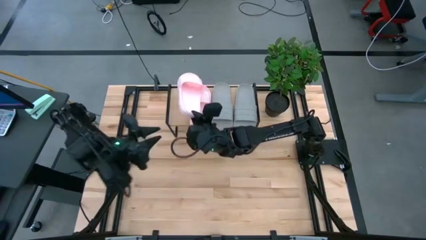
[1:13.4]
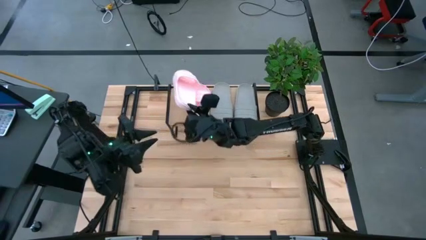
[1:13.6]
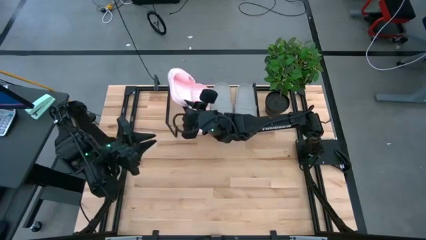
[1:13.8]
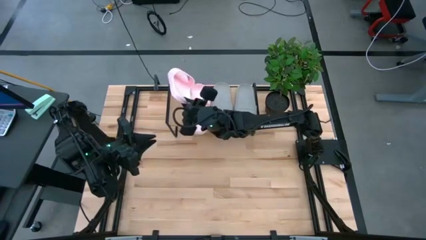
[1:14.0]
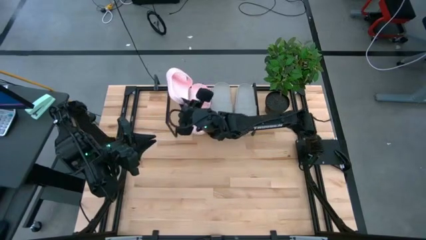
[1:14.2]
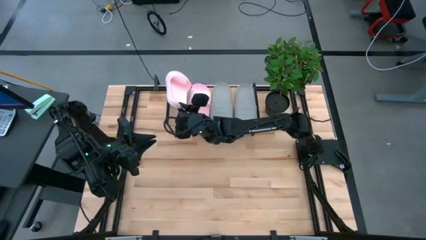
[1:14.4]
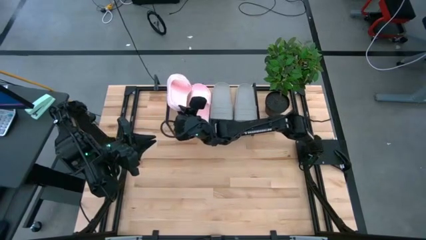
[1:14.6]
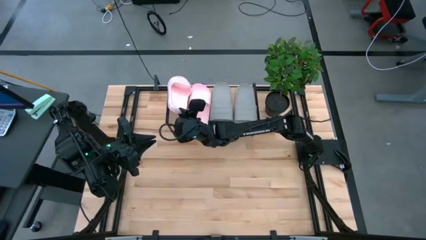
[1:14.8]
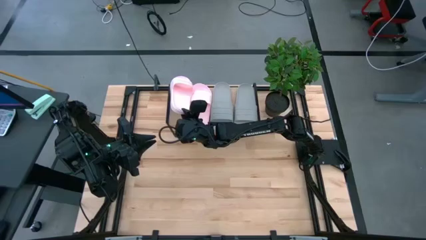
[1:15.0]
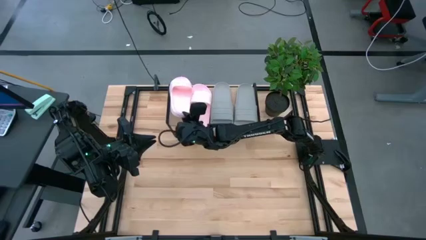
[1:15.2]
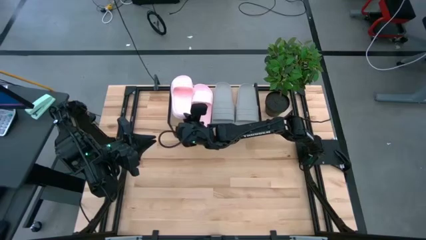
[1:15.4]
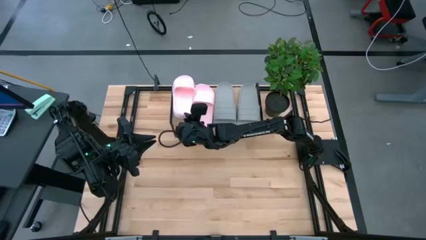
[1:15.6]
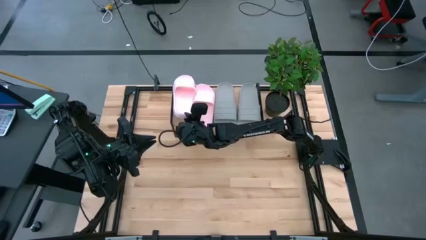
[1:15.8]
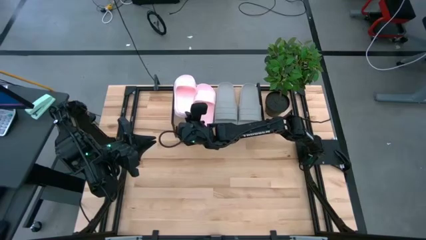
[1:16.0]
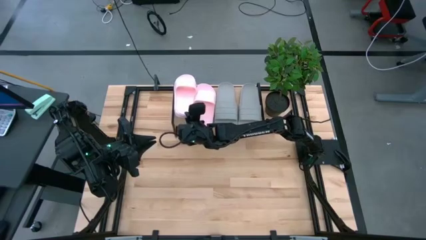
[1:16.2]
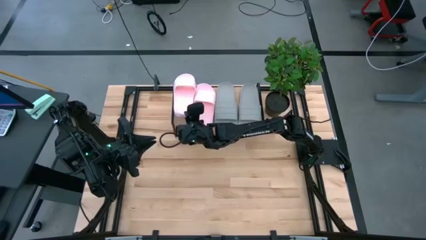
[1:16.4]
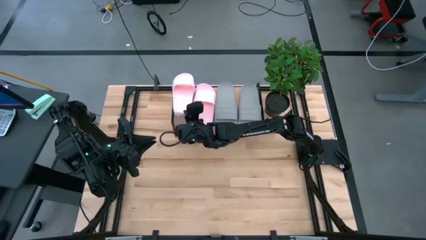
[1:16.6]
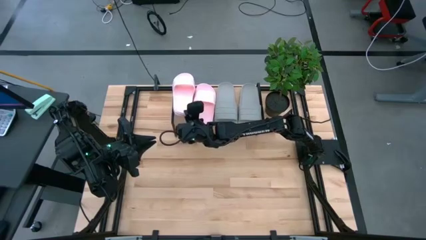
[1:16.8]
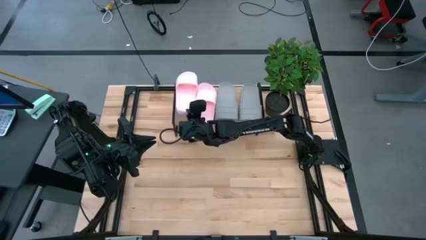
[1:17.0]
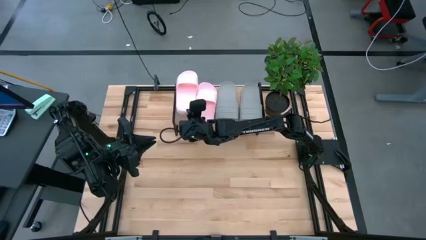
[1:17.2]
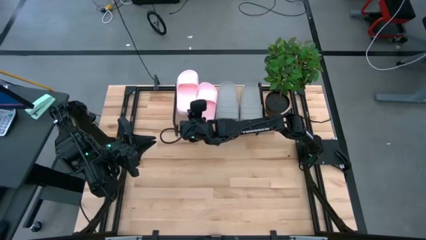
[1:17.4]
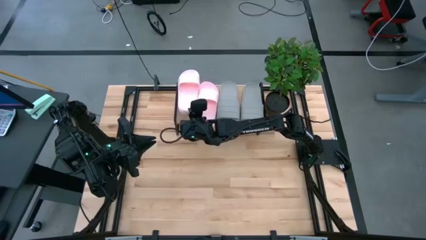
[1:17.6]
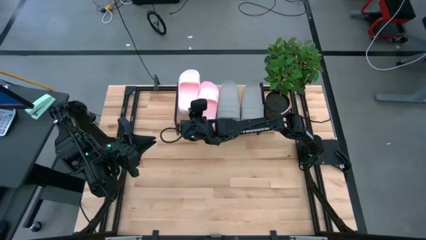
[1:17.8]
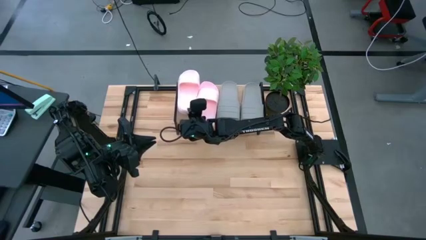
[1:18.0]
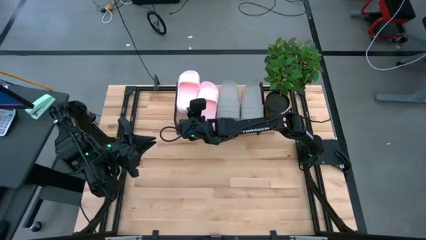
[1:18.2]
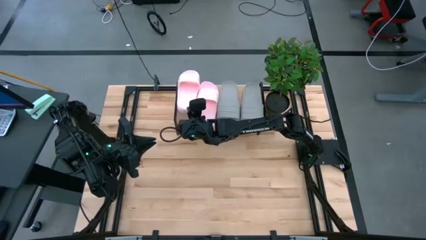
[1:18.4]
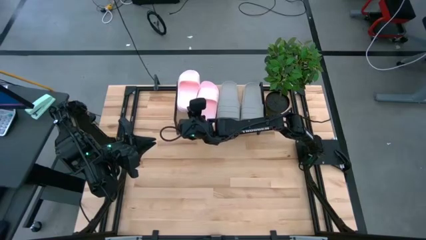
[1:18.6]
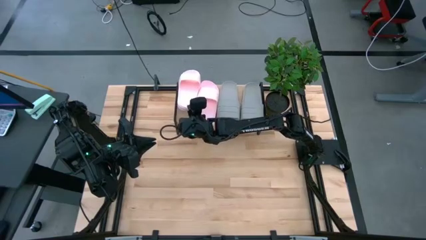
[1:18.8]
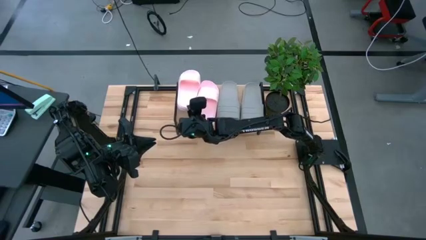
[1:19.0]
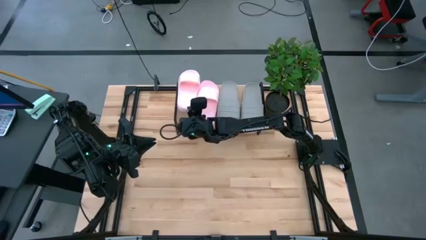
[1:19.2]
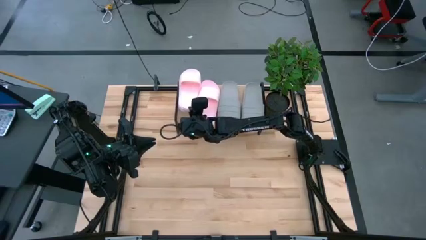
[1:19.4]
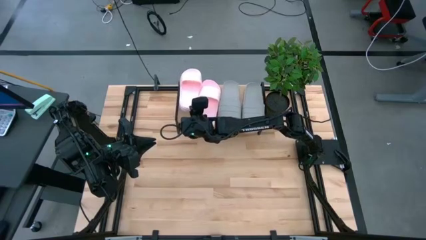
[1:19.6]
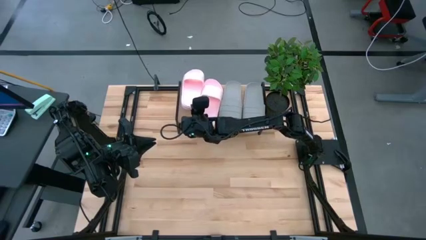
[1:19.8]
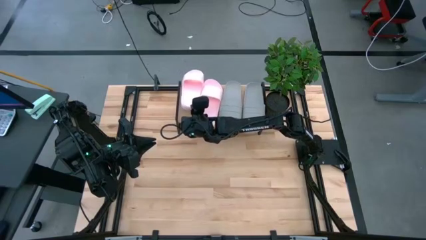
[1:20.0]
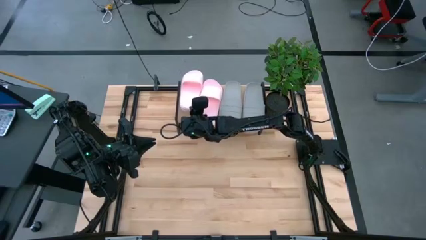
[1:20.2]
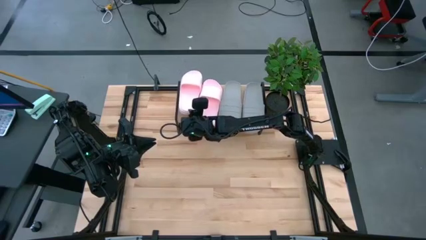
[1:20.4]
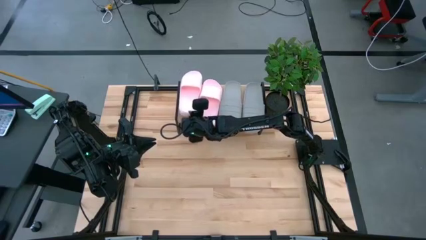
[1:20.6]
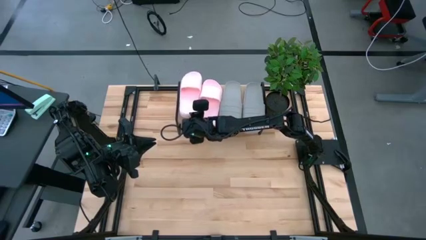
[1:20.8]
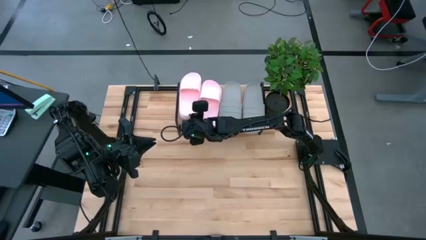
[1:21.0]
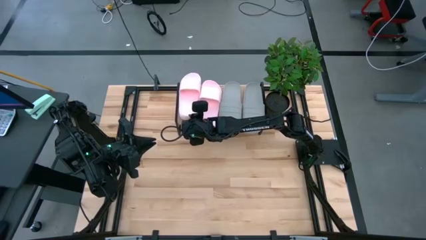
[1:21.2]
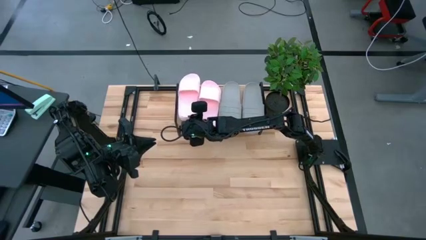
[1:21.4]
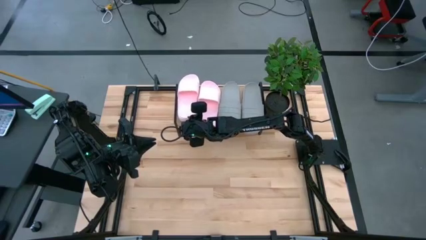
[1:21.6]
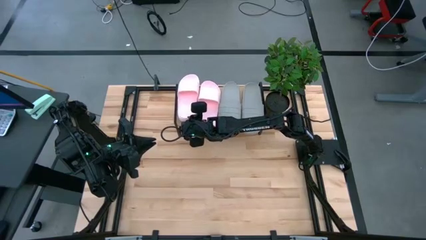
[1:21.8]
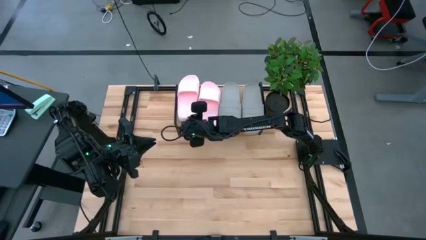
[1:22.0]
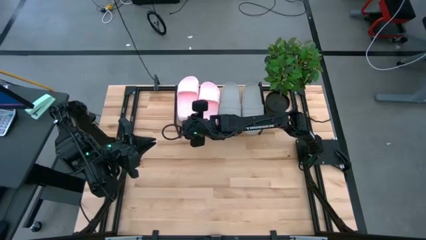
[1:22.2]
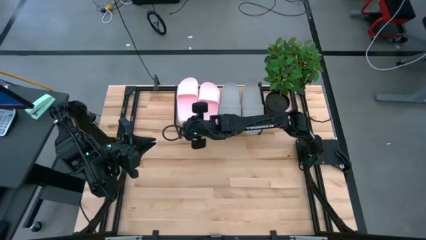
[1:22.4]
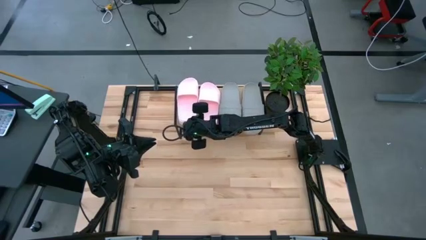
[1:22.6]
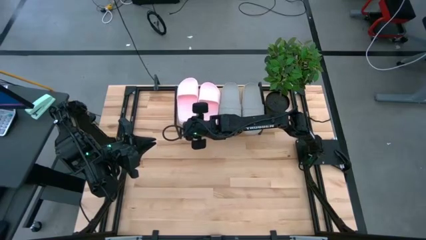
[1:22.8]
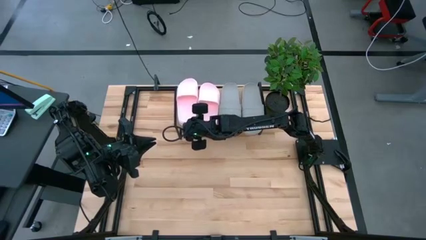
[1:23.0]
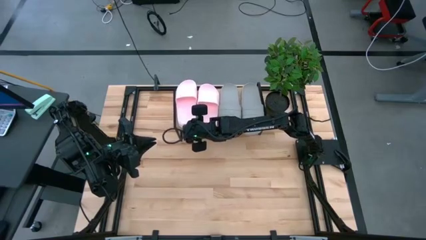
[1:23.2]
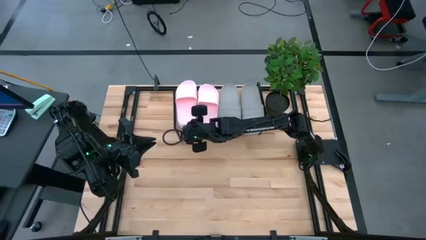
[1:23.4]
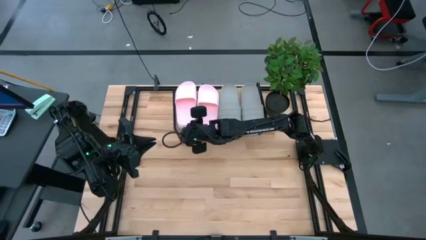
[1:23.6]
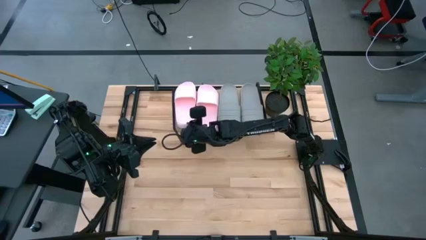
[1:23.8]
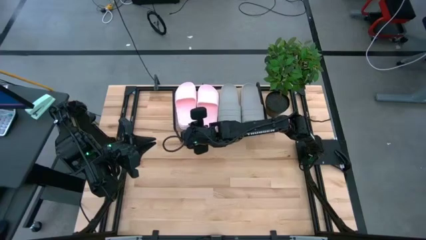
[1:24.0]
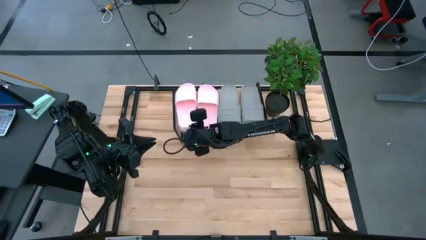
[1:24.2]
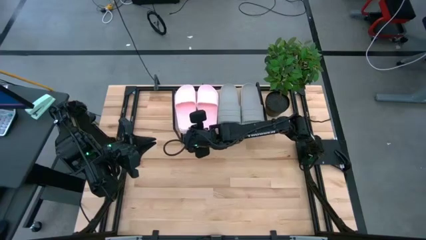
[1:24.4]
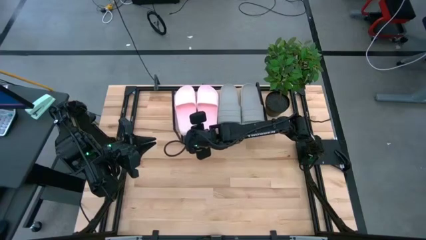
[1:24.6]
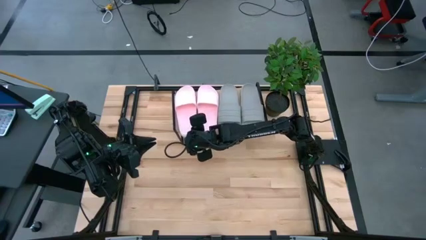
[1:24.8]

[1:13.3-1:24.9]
Task: Pick and place slides into the shelf
Put the pink slide onto the shelf
